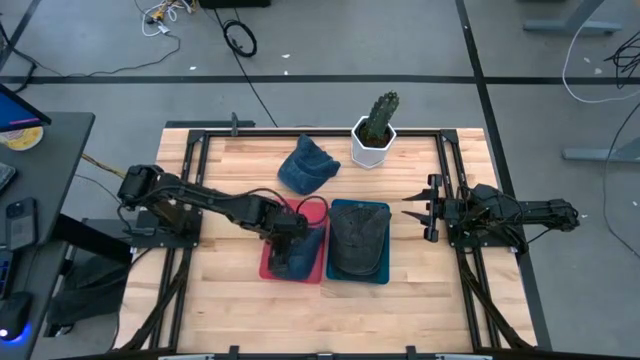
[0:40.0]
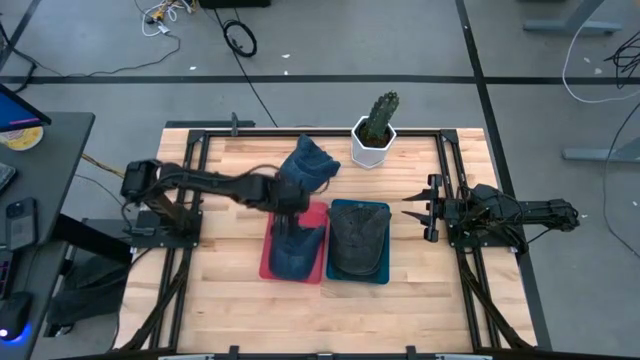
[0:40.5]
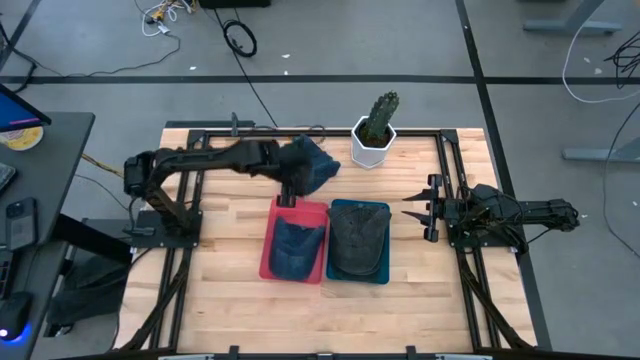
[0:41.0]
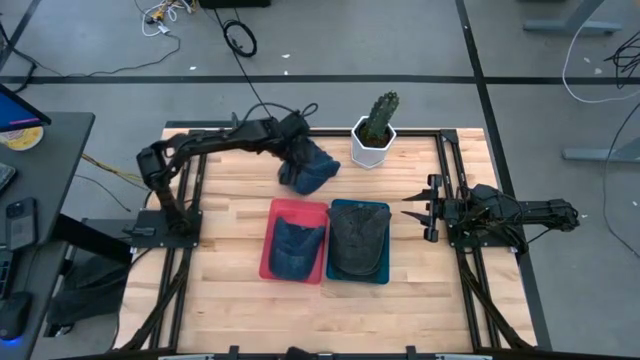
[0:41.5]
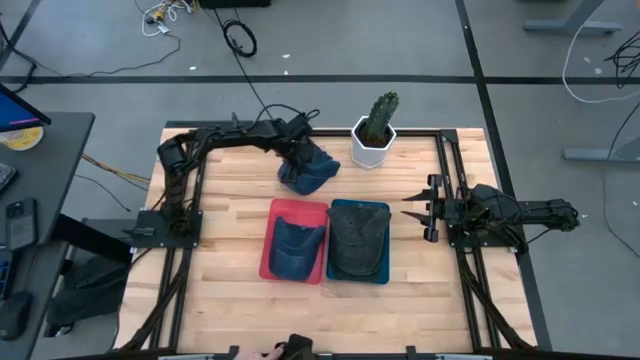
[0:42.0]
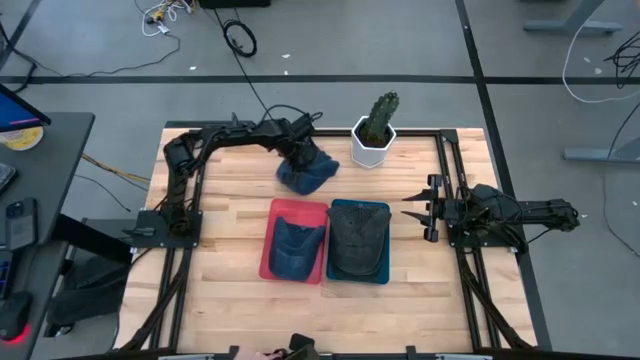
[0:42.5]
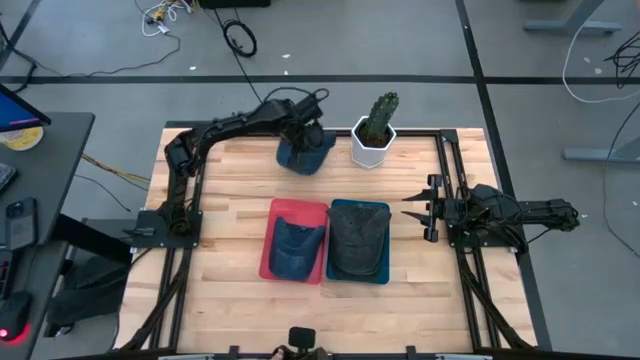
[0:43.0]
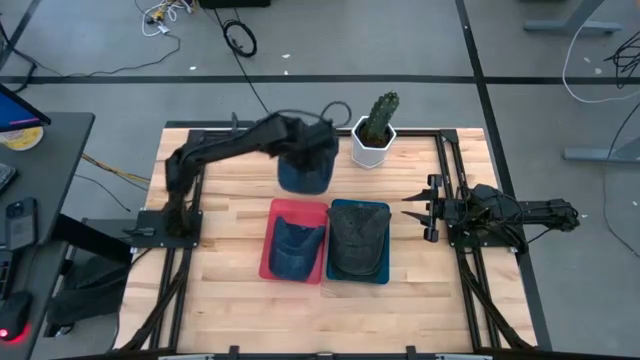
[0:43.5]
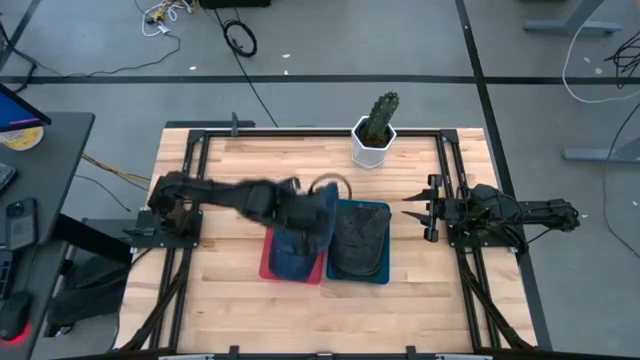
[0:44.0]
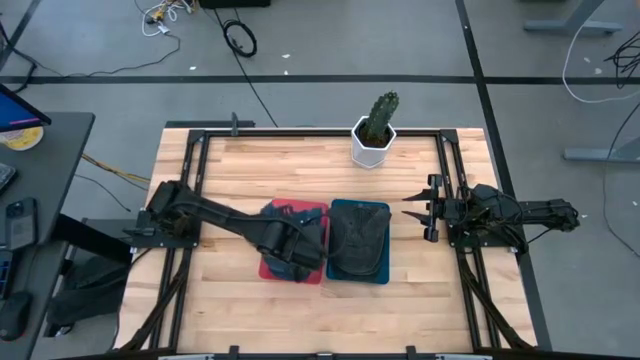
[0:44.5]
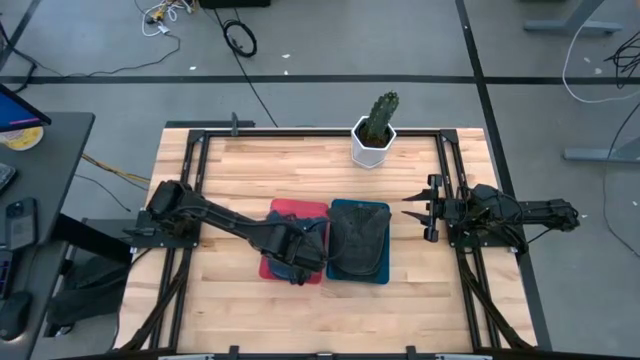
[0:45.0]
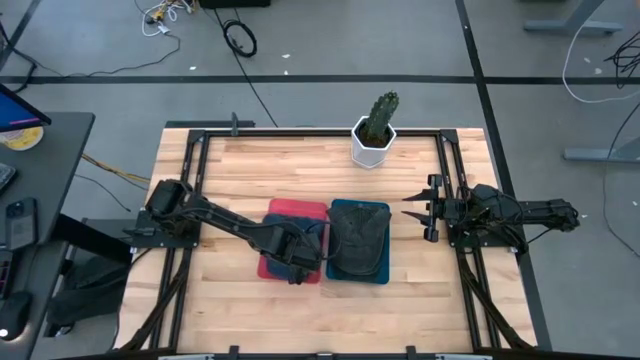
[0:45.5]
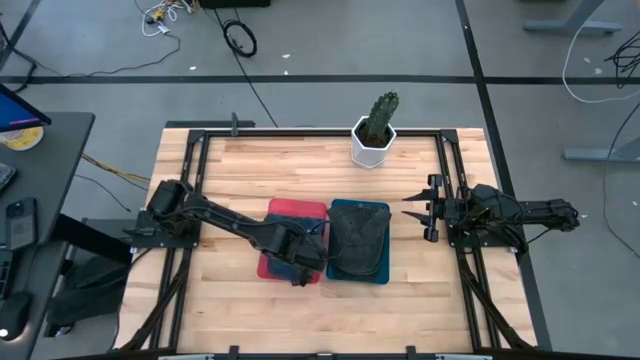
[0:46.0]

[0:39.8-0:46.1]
Task: Pick & Place hat
Put the blue cap into the pink bin

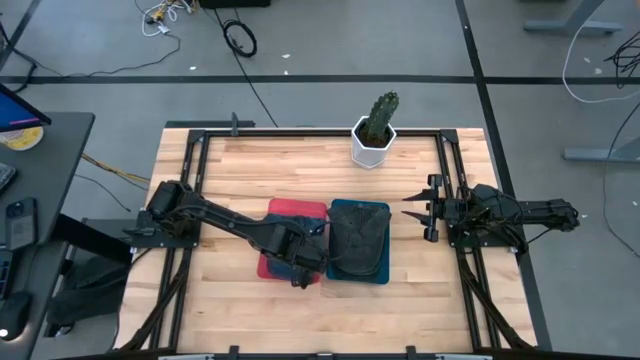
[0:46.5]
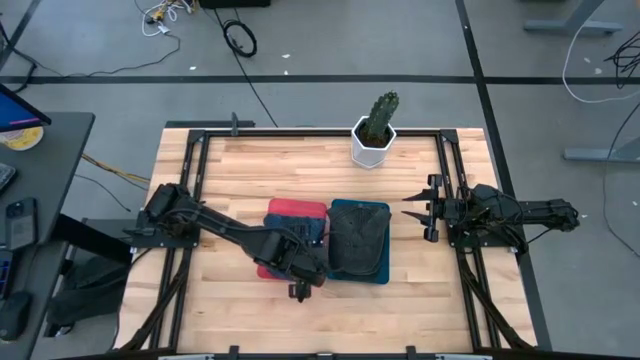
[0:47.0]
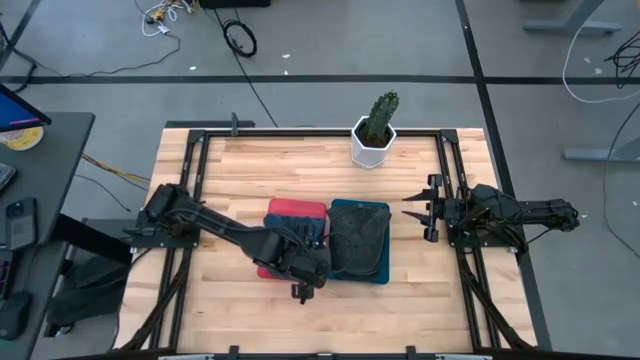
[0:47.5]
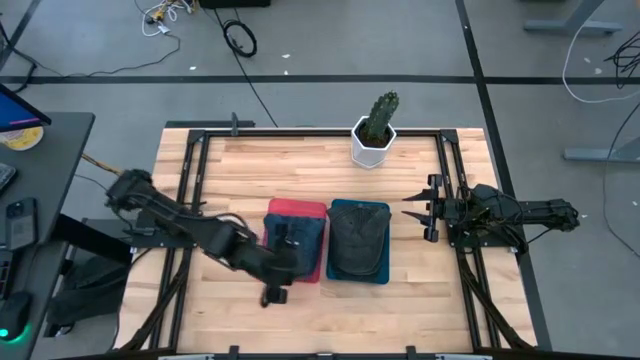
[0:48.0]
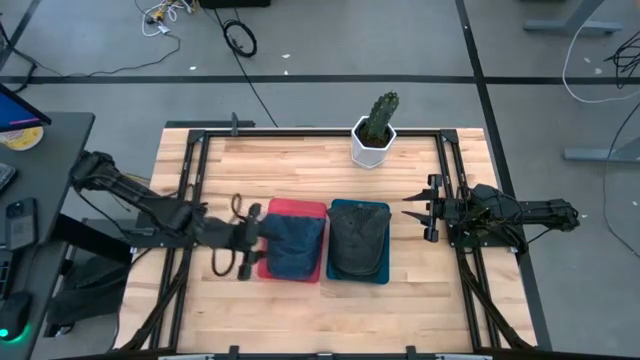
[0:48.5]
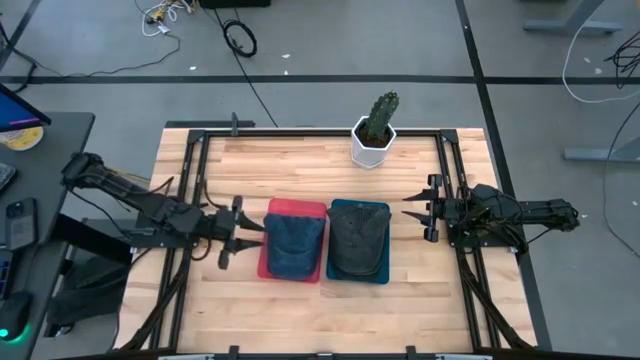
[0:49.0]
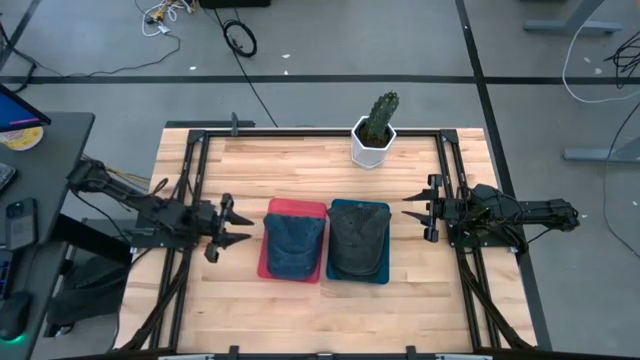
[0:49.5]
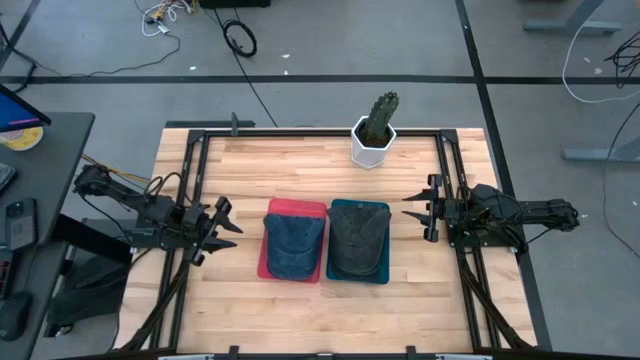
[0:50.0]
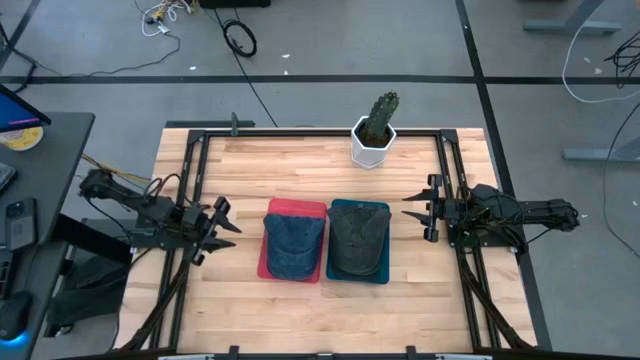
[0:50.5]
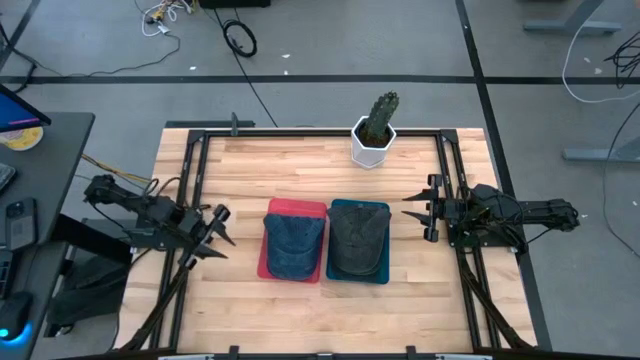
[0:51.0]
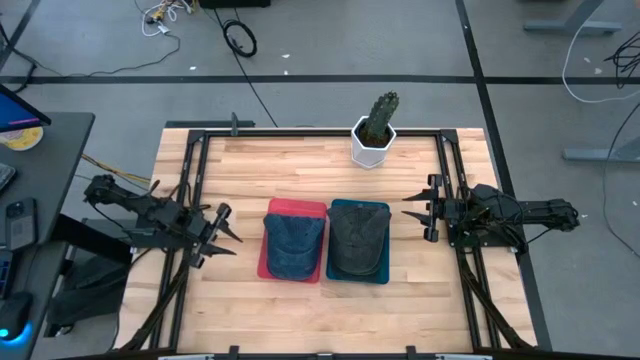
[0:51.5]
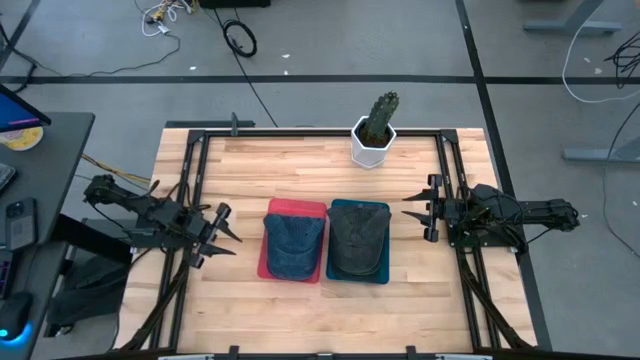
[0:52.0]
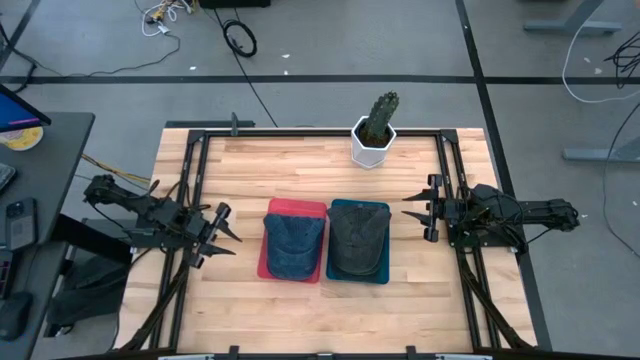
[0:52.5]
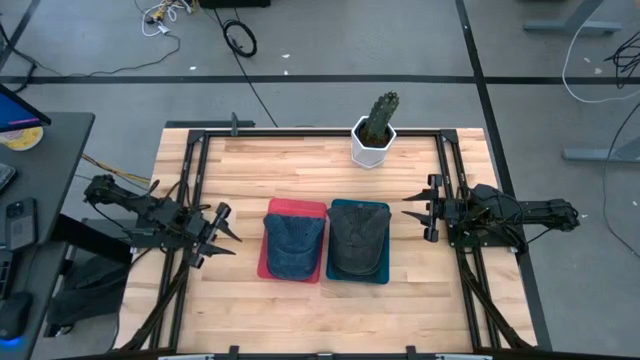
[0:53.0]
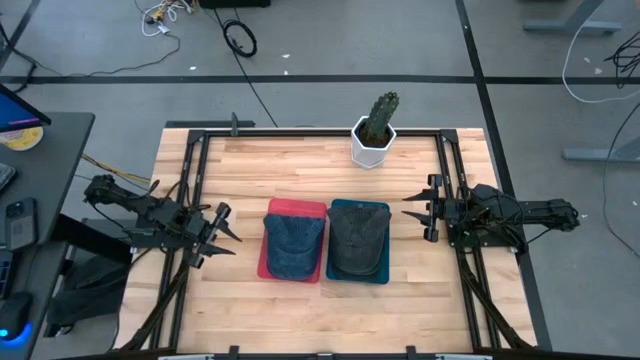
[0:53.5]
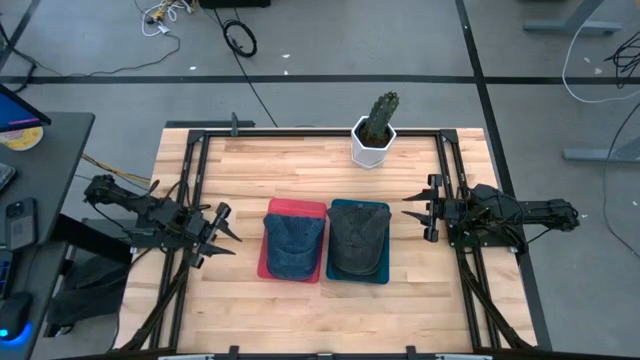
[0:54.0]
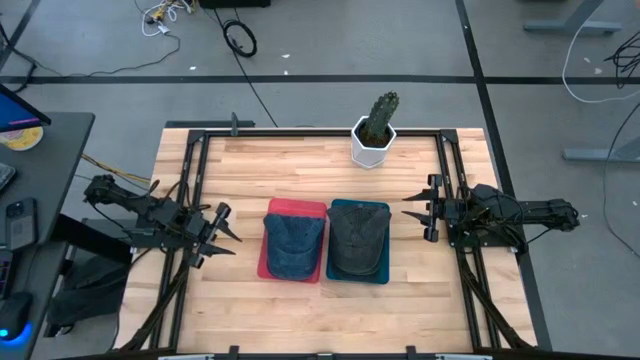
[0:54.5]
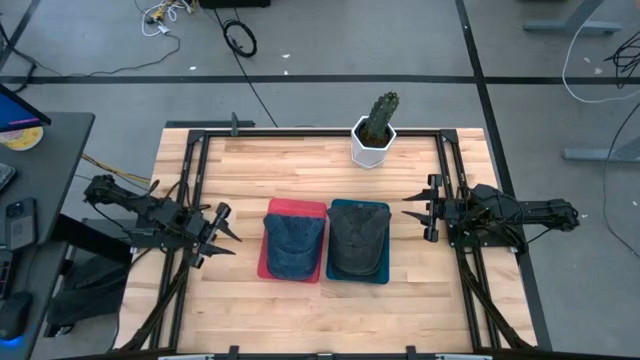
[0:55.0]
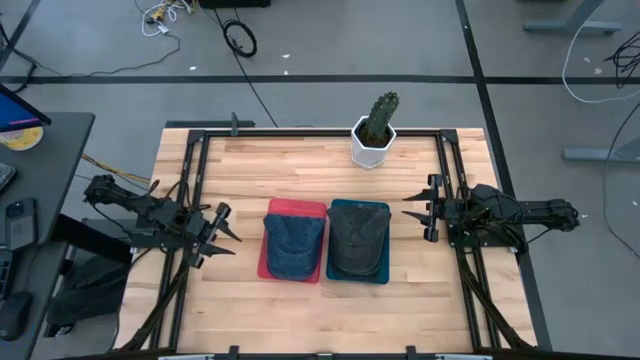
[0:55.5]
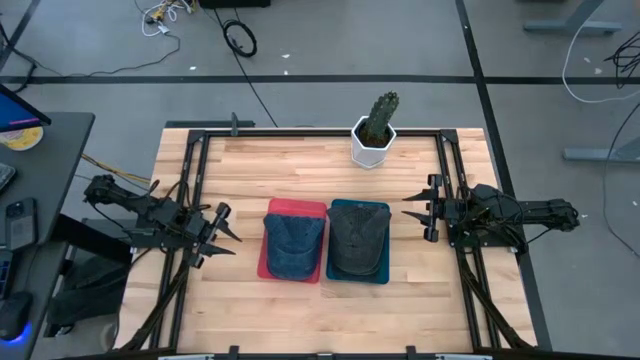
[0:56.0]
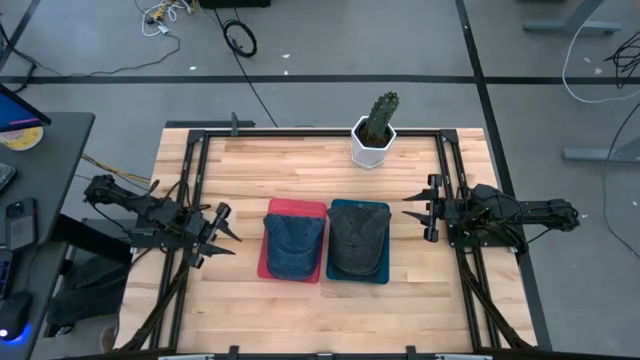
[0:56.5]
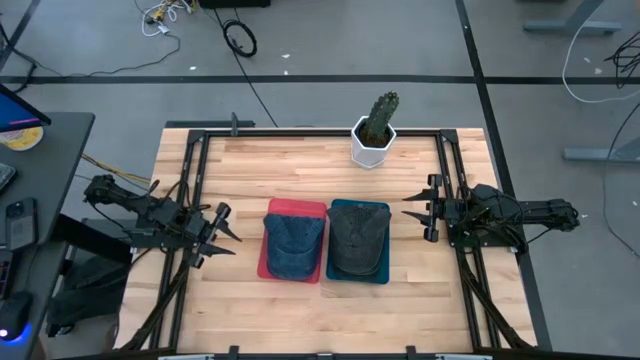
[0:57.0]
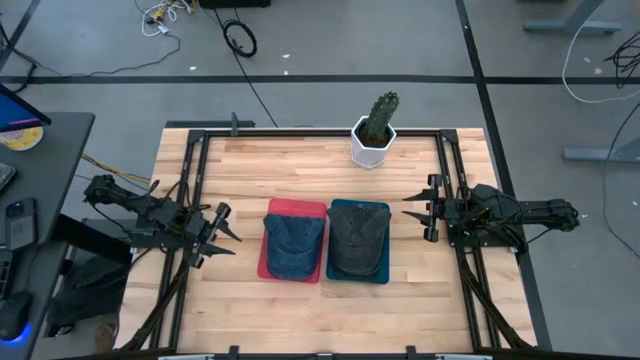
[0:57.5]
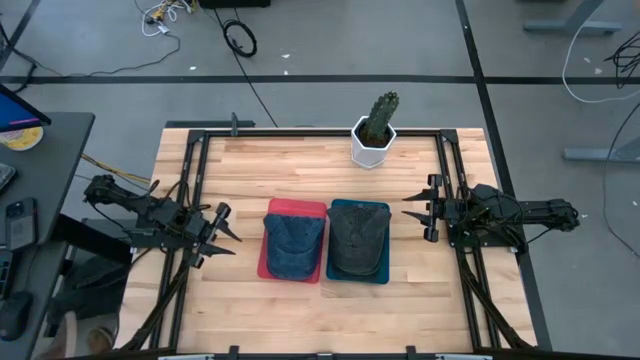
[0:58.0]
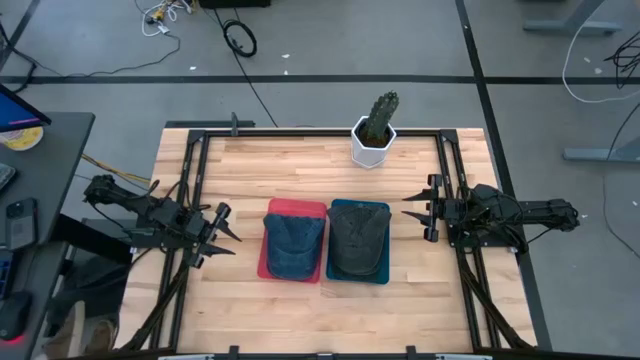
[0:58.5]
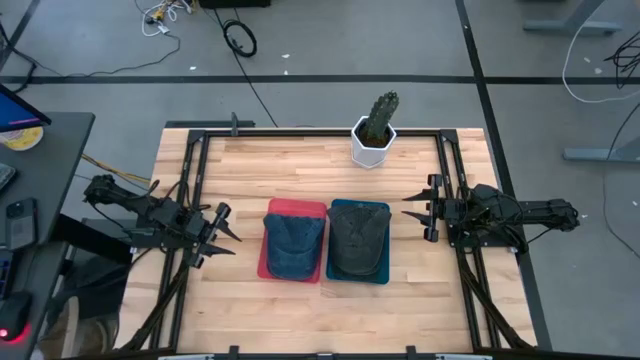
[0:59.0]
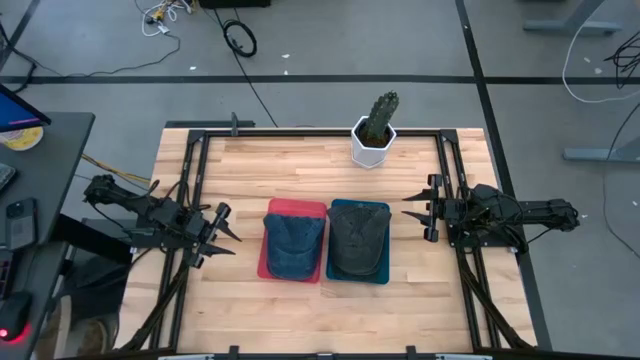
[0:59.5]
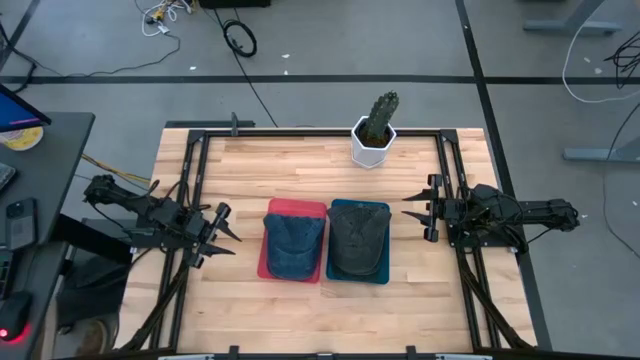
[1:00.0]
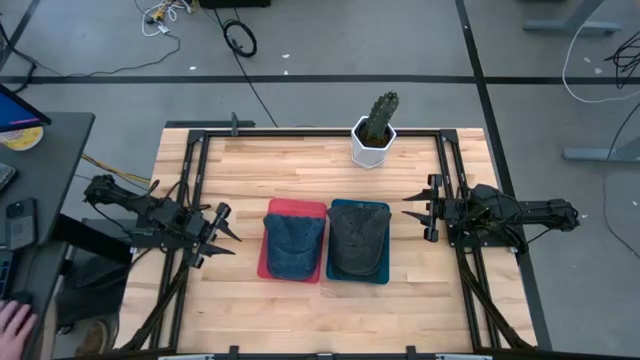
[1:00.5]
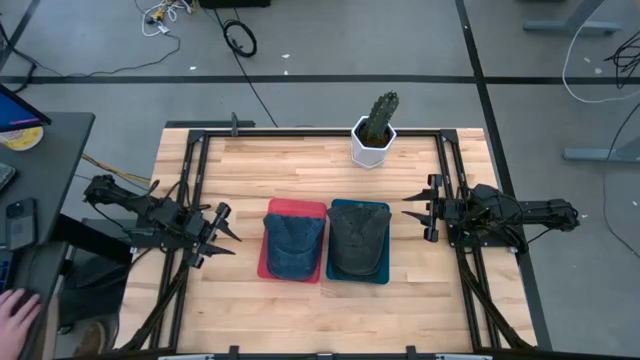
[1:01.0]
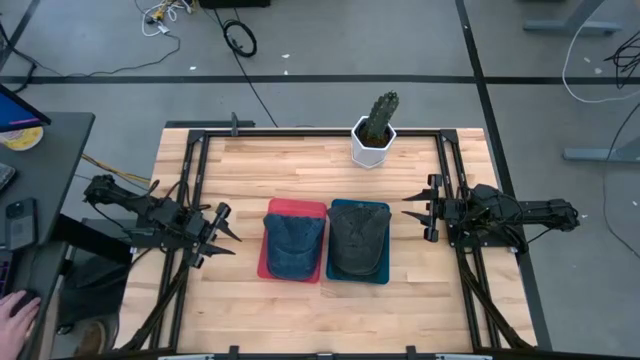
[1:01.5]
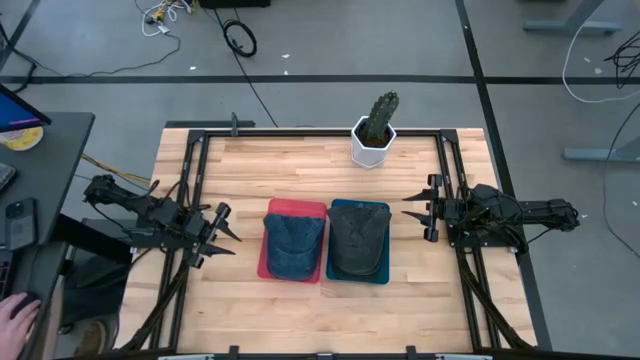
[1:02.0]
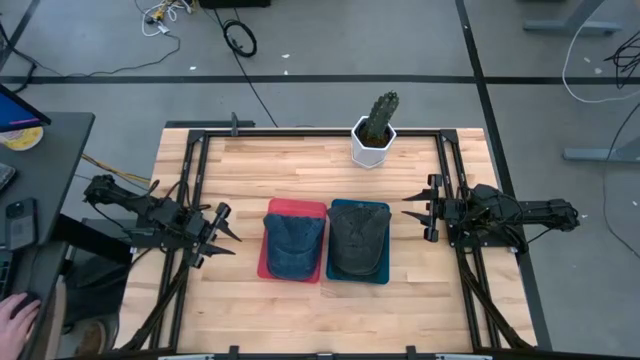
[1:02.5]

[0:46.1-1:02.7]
Return to Home Position
